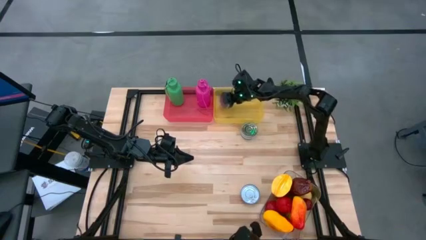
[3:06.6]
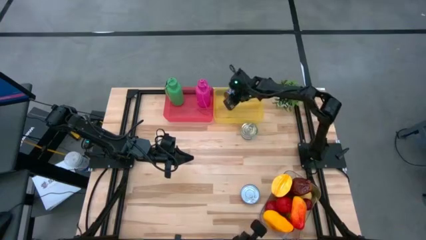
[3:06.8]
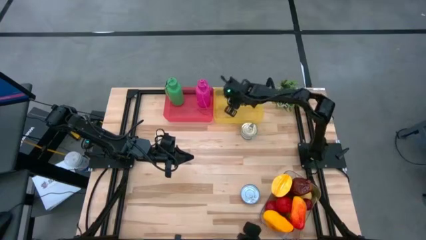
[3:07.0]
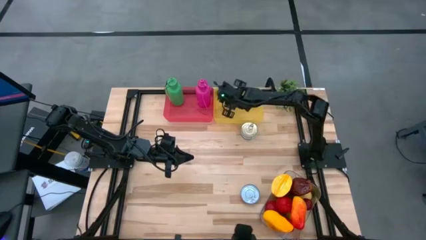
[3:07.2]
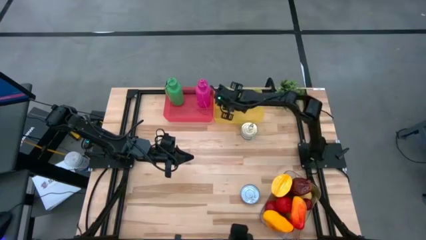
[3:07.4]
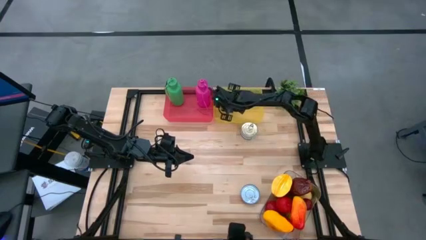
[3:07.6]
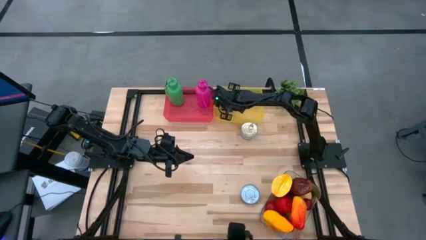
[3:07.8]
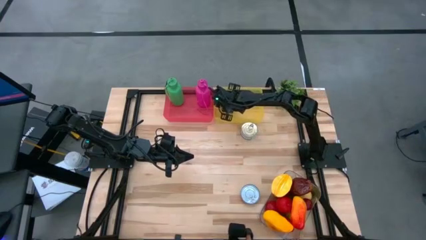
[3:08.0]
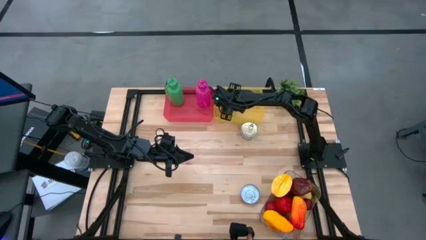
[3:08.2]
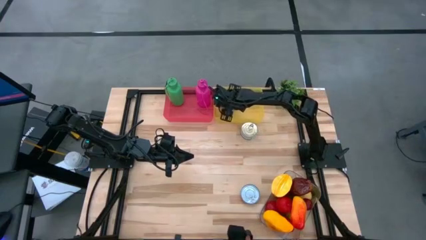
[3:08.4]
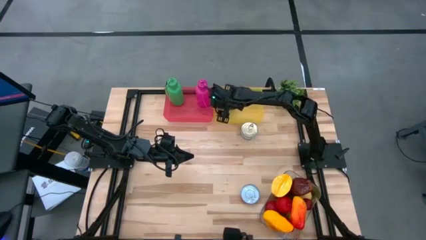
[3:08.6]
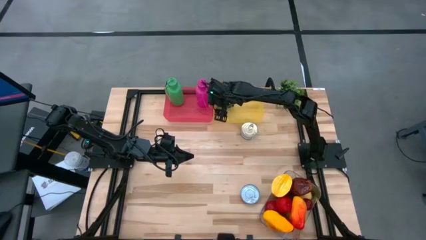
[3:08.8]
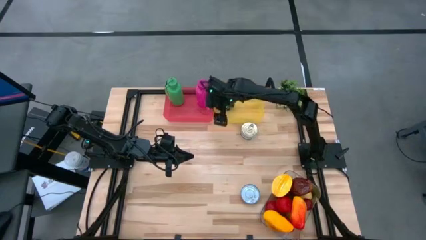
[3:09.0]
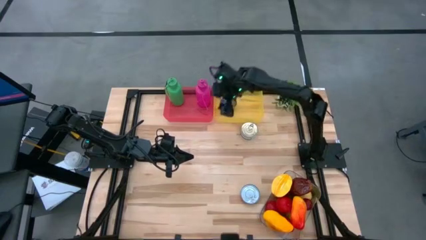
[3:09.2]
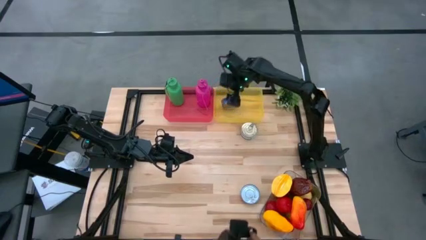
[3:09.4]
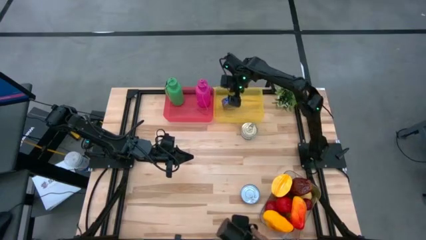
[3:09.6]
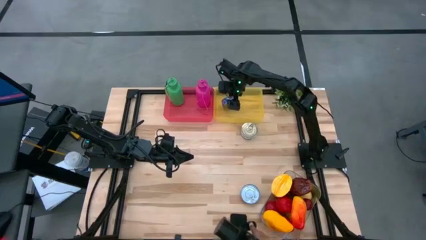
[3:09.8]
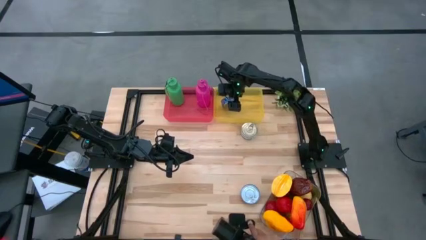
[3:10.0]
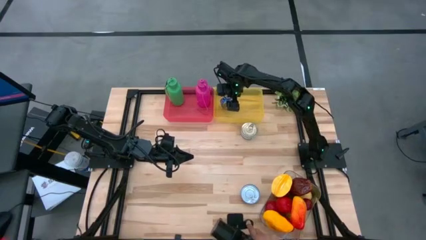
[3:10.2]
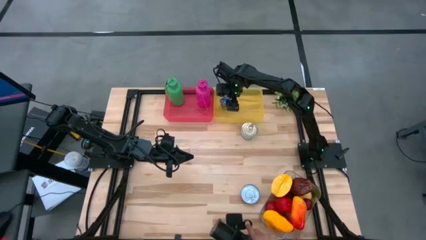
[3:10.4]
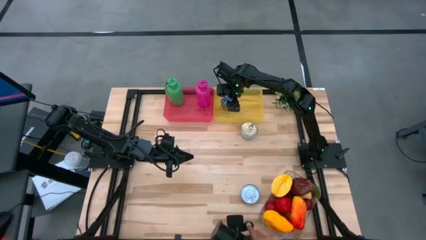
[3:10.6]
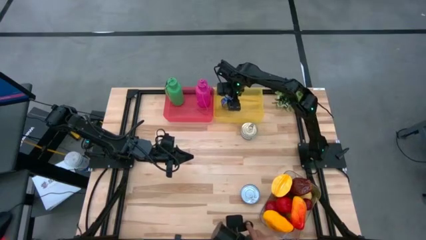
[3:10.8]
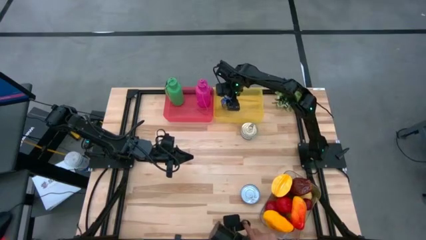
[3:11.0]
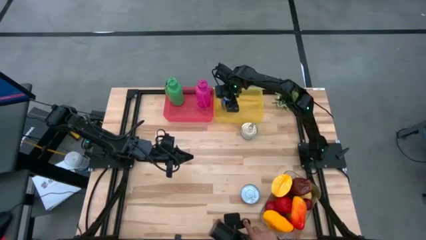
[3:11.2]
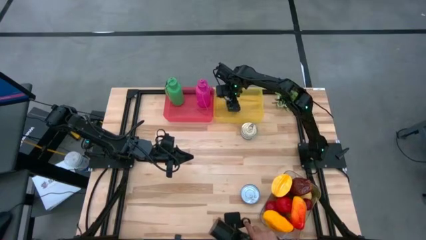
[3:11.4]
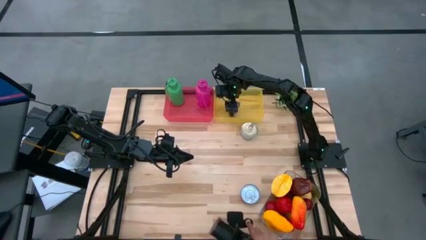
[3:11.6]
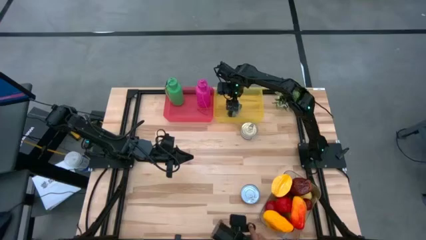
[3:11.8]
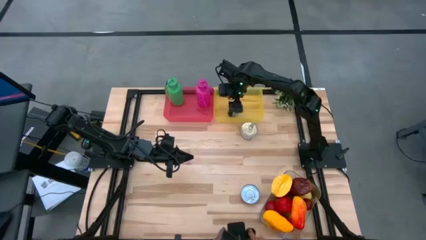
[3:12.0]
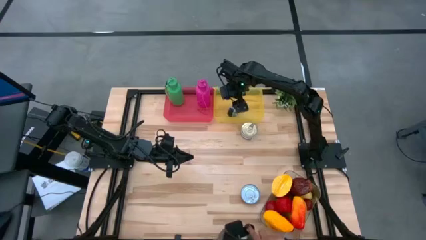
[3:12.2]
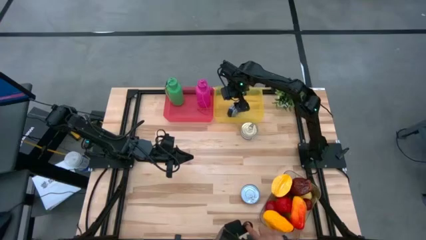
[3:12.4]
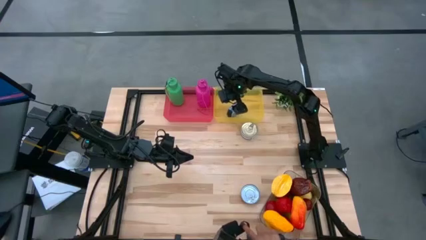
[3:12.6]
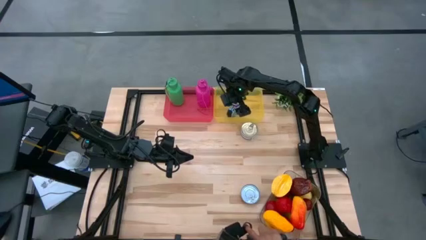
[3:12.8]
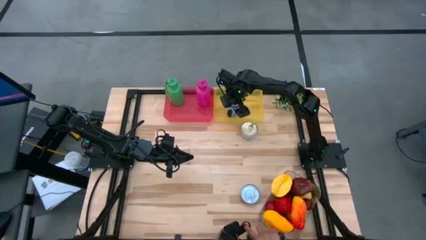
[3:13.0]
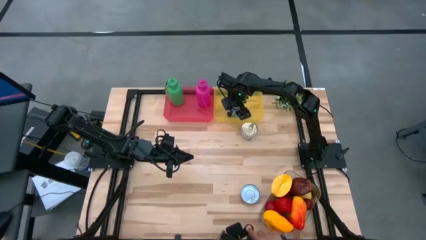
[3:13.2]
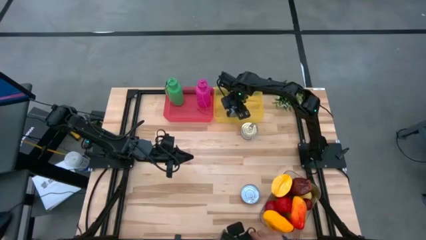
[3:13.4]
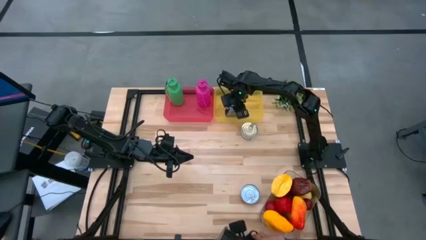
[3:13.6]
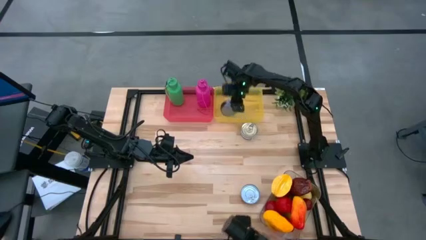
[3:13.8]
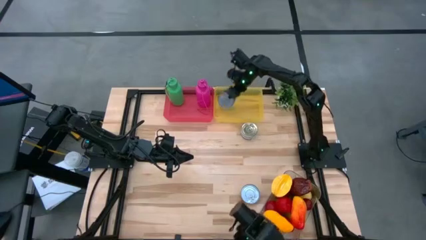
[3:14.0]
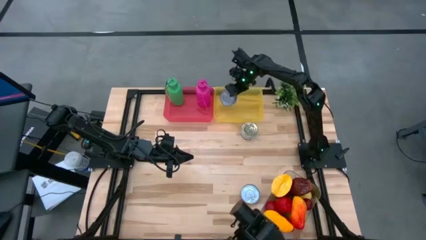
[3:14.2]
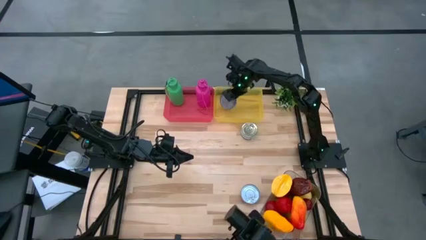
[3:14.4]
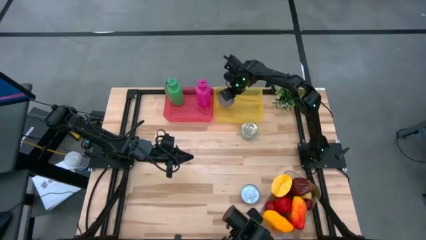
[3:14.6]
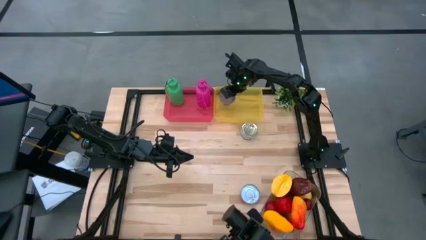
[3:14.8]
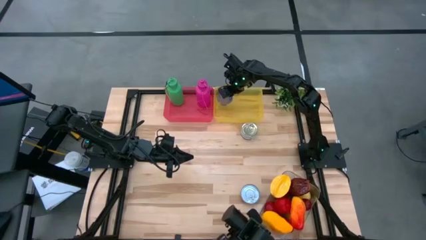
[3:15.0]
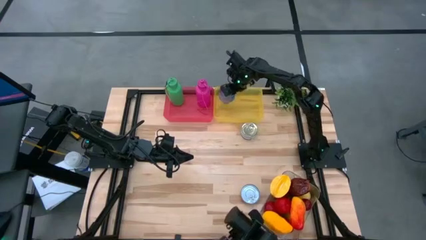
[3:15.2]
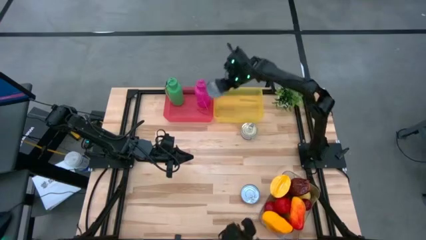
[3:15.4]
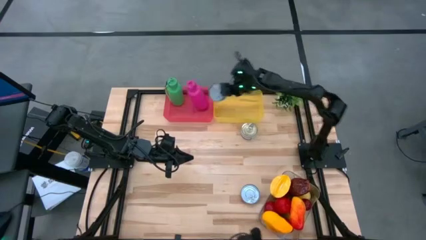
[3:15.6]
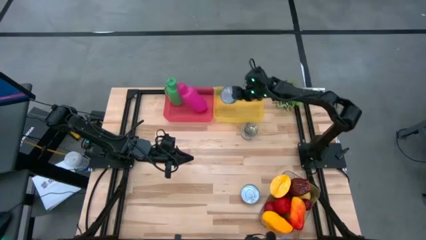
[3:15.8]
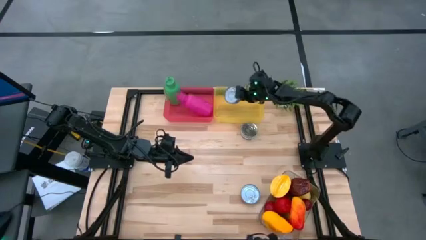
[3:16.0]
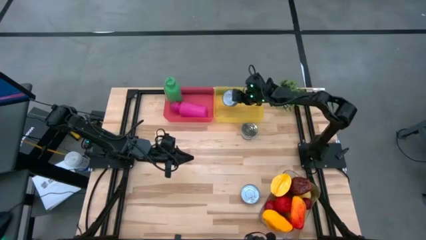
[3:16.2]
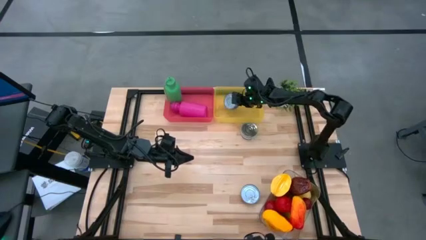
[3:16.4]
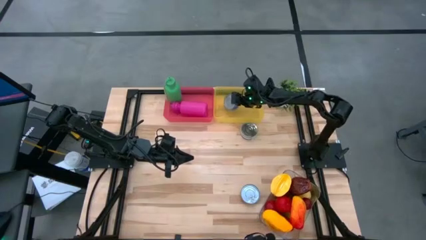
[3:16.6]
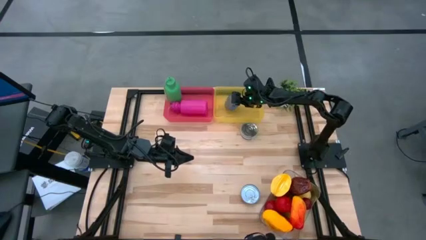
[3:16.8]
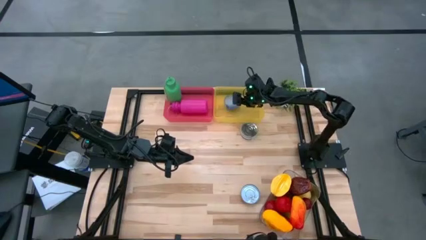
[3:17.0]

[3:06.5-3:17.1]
Task: Pick & Place Food Item
Put the blue tuna can into the yellow bin

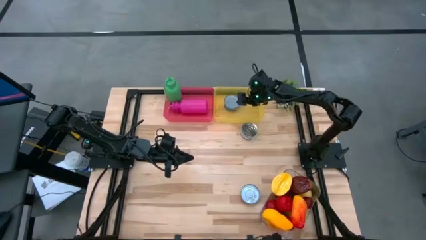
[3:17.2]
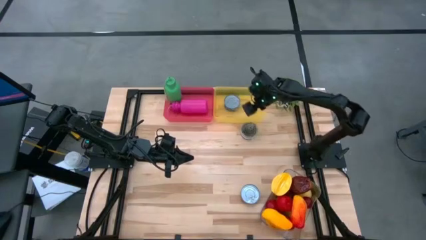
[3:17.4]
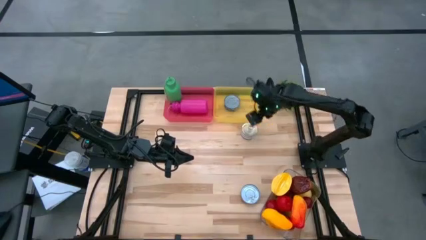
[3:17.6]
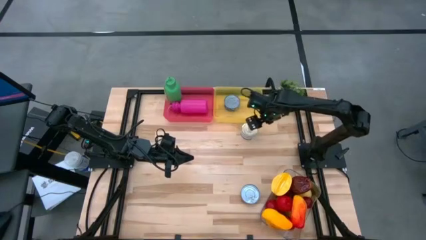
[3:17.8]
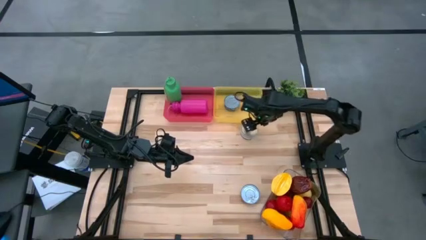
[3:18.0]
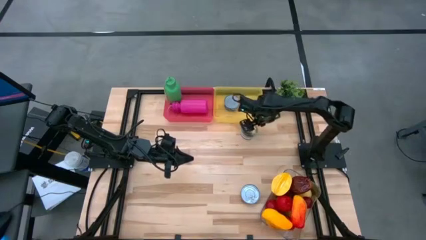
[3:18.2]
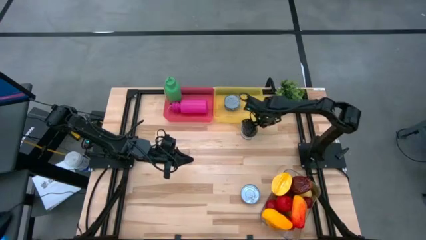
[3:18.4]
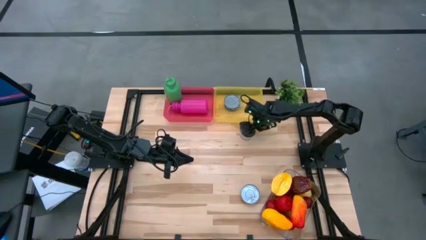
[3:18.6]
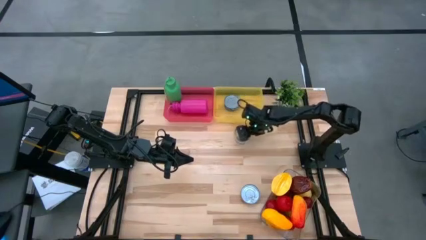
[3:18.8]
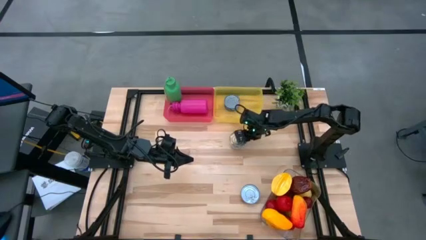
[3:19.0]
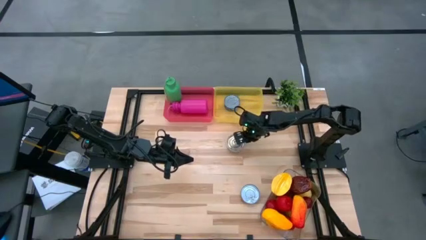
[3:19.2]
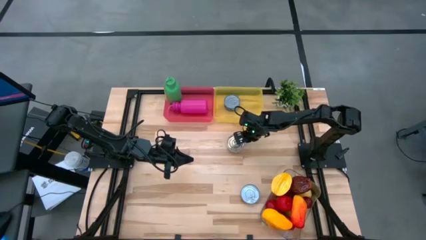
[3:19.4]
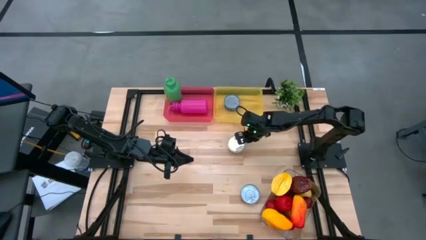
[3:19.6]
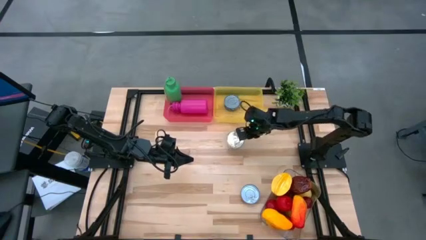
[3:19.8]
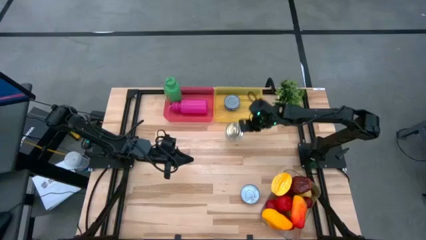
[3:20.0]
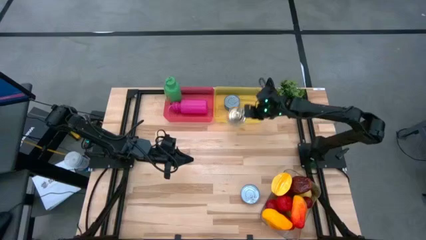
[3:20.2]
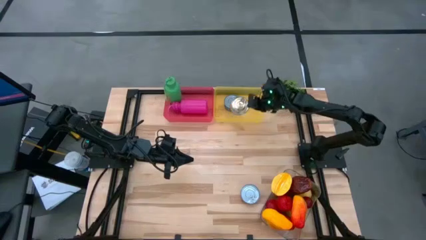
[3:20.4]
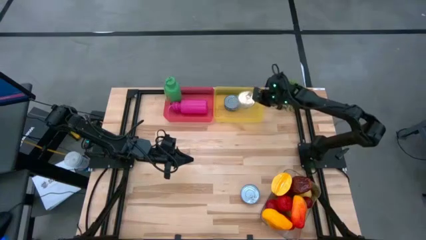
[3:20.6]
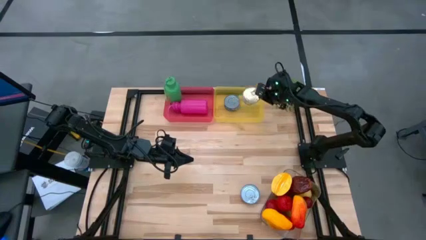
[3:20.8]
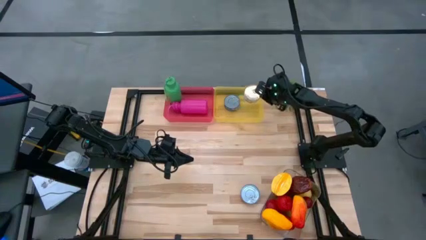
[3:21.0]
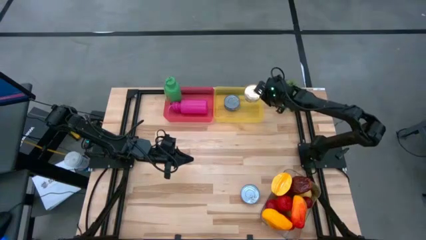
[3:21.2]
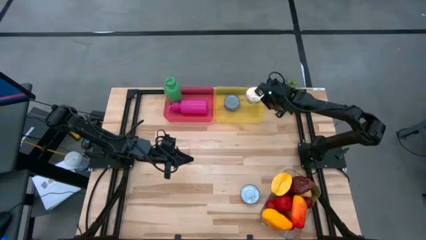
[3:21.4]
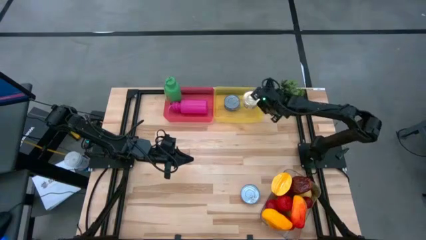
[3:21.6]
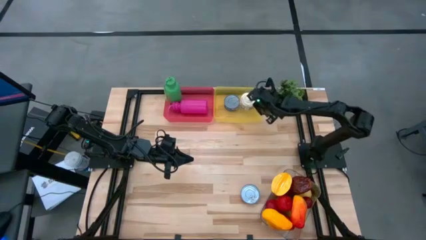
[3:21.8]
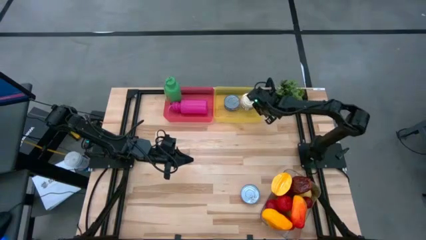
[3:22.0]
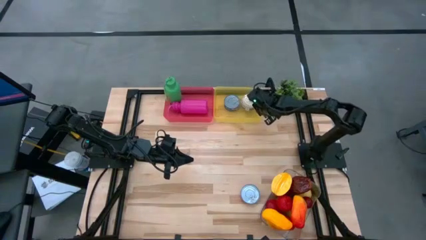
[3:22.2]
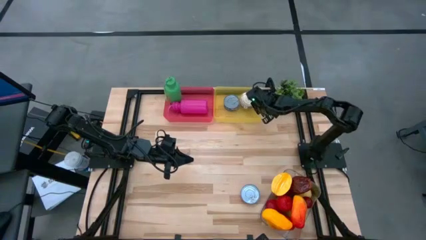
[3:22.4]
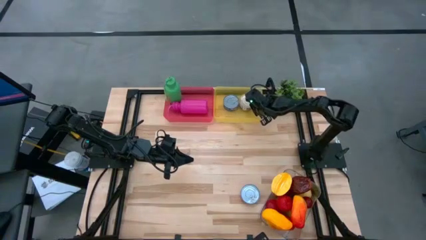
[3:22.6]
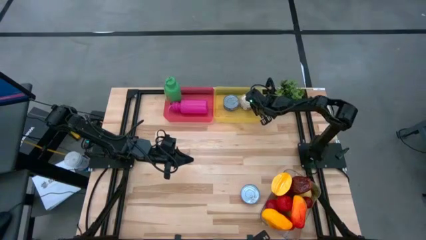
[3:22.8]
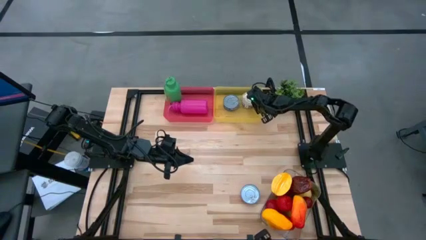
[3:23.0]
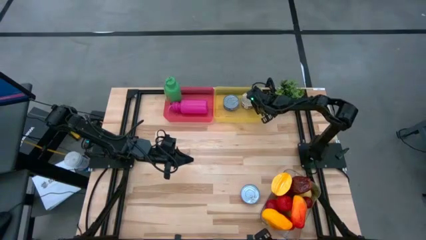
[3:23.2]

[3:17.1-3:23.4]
Put the blue pink tuna can into the yellow bin
